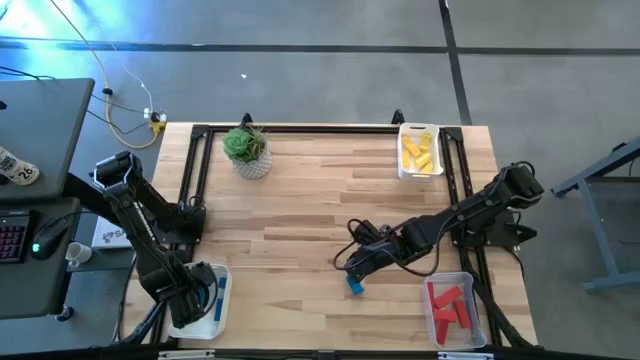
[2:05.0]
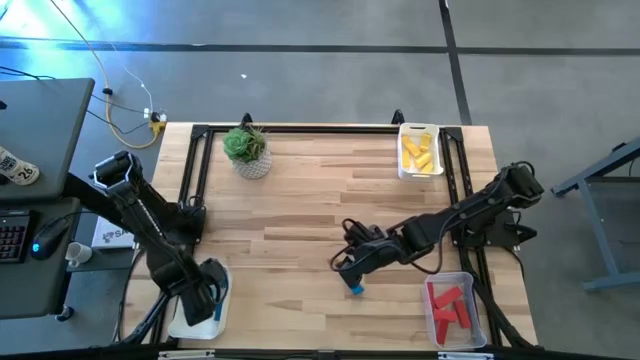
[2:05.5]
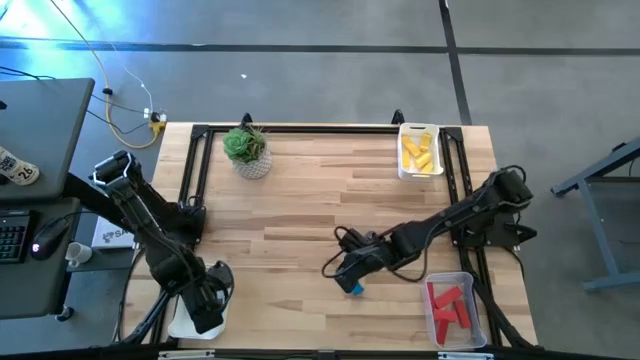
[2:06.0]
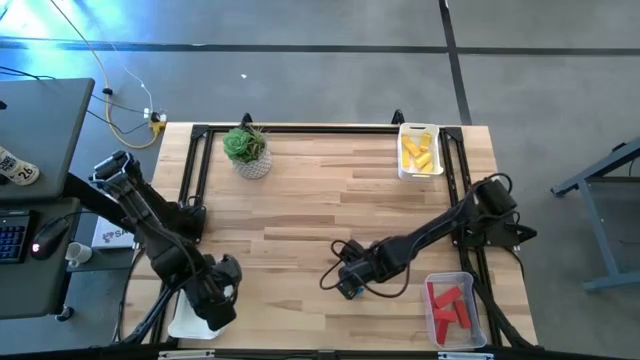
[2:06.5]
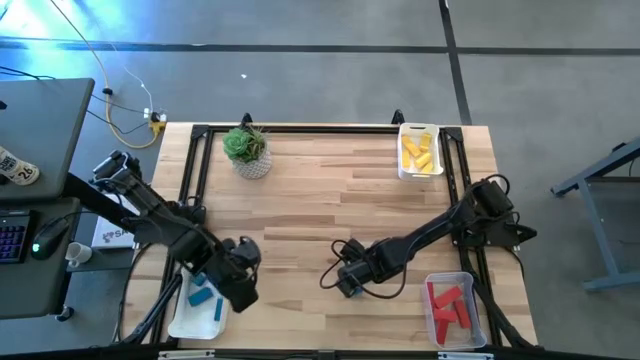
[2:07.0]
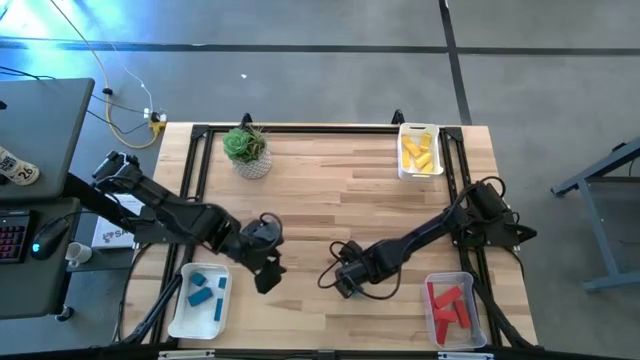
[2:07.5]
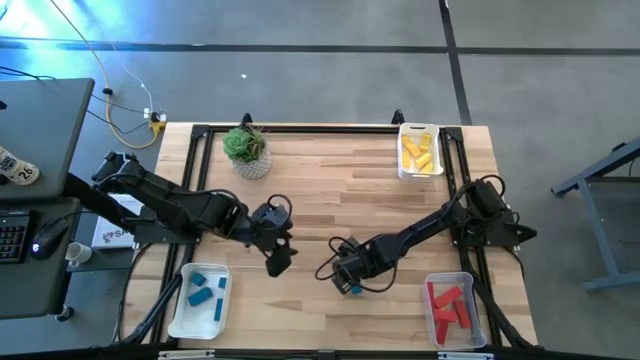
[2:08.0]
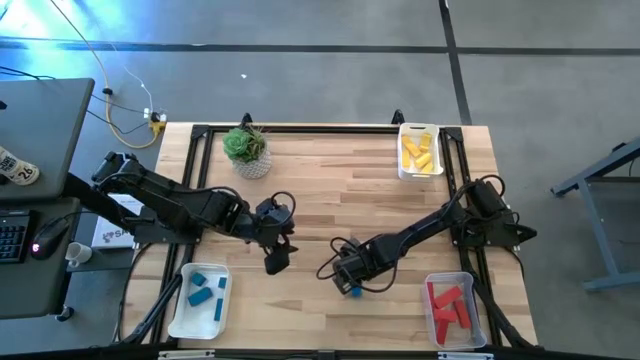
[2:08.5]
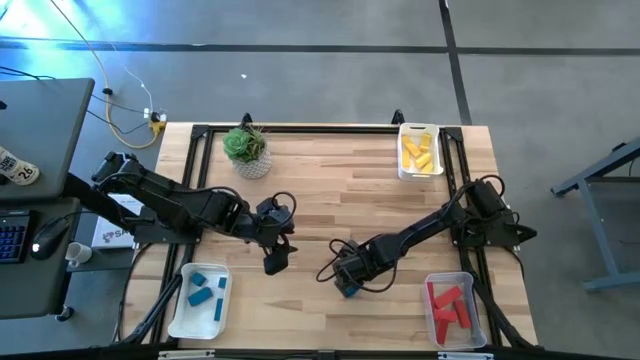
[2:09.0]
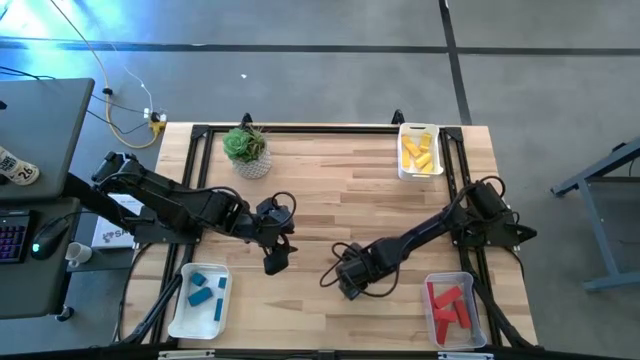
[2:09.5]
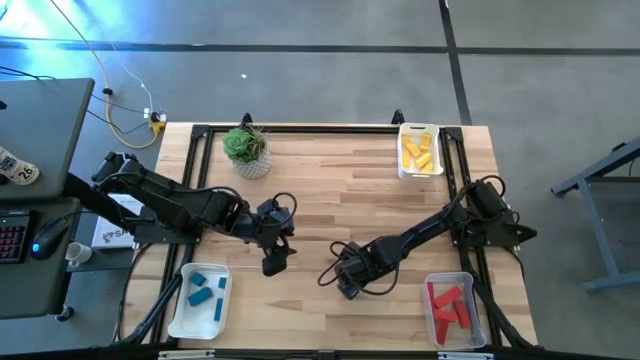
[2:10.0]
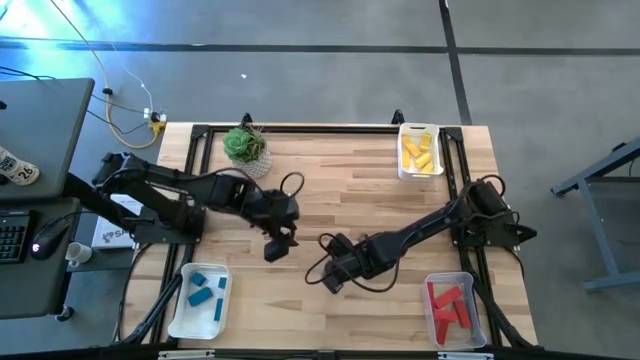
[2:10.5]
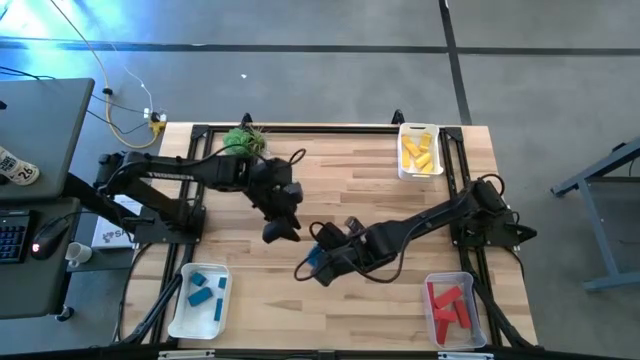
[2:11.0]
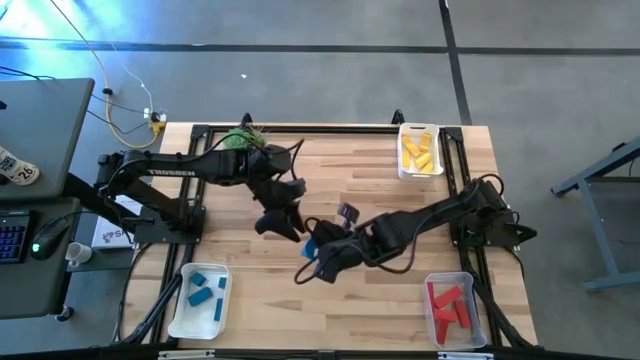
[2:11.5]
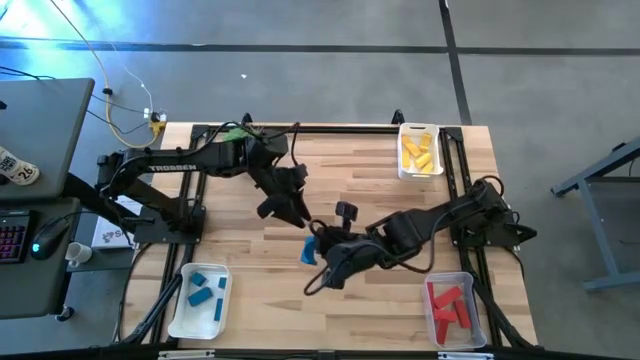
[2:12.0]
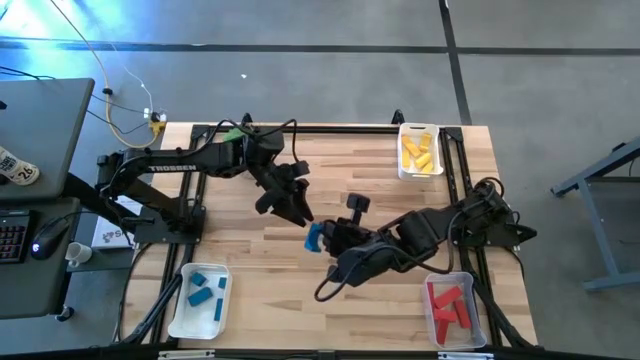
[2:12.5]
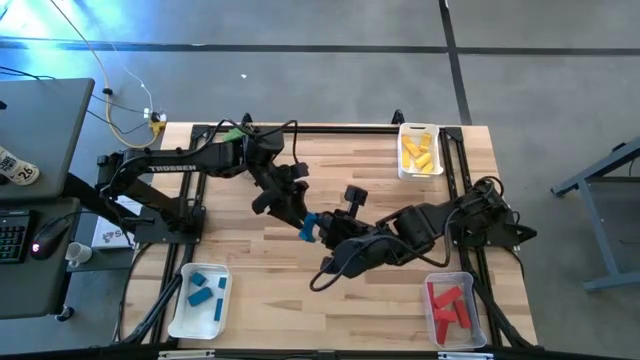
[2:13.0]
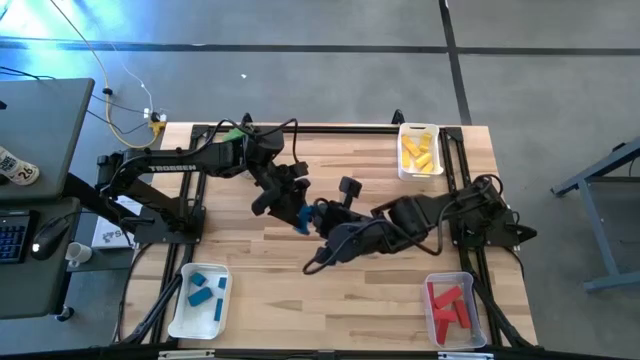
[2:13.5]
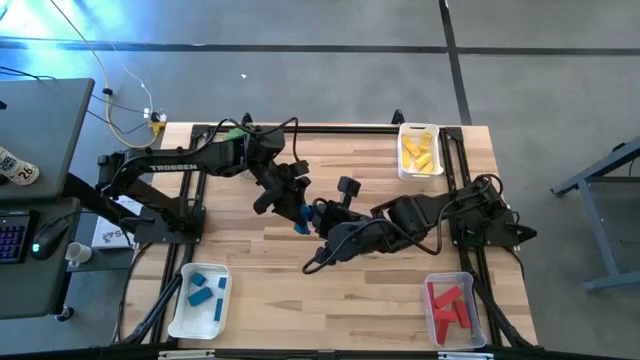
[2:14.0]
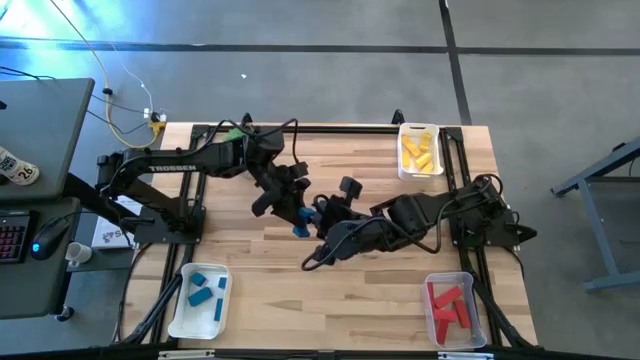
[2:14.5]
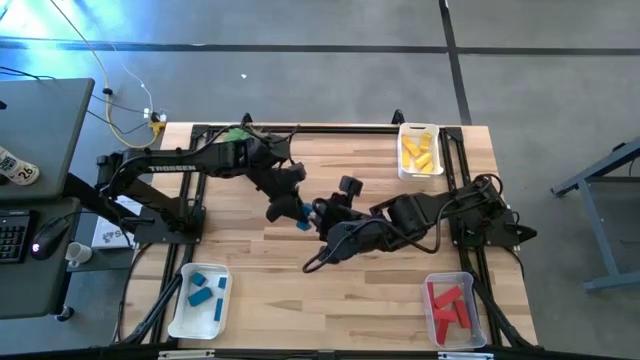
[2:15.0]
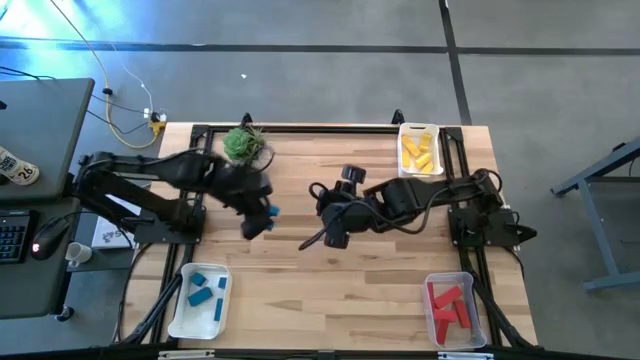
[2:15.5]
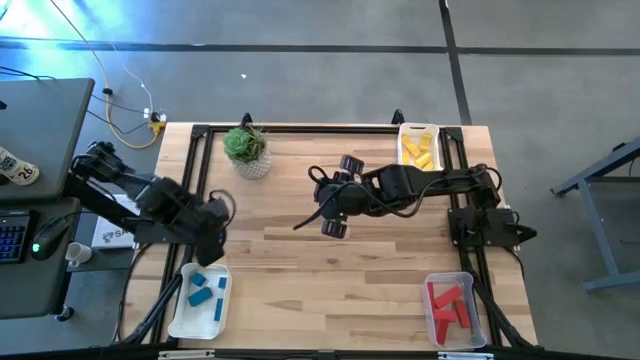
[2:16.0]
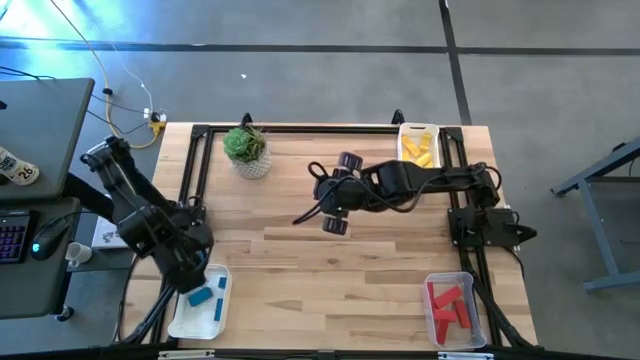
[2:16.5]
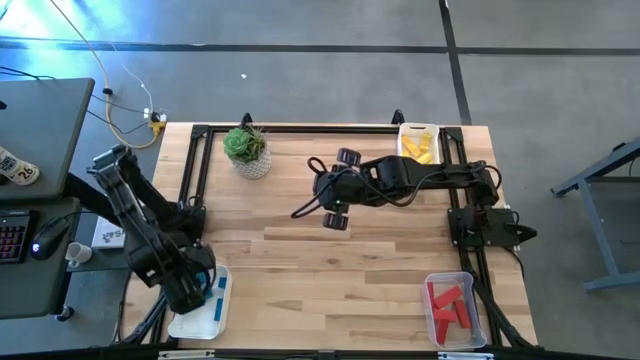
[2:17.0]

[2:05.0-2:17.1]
Task: Sort & place blocks by color
Put the blue block into the bottom white bin

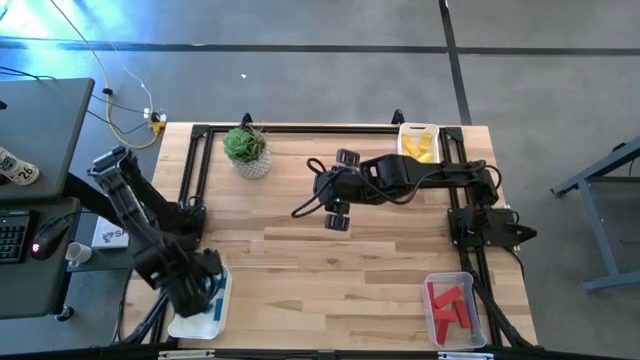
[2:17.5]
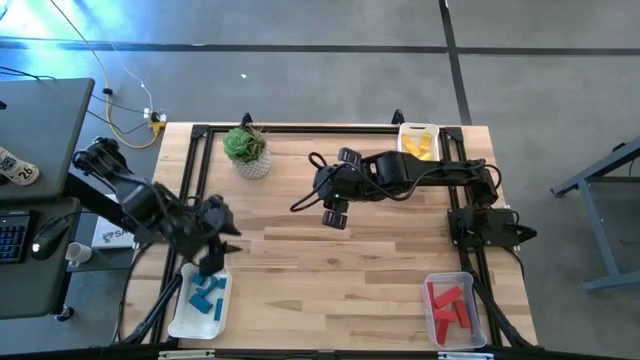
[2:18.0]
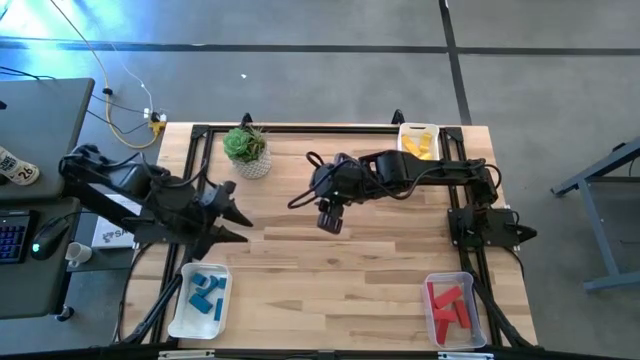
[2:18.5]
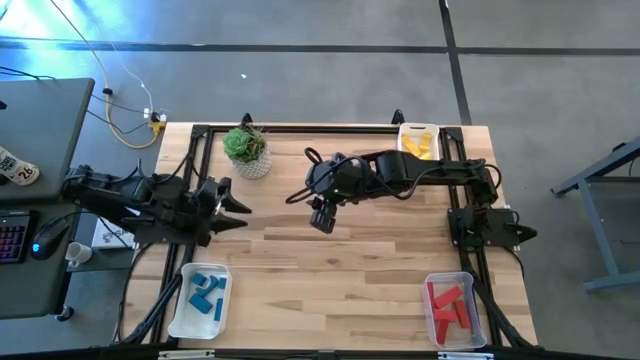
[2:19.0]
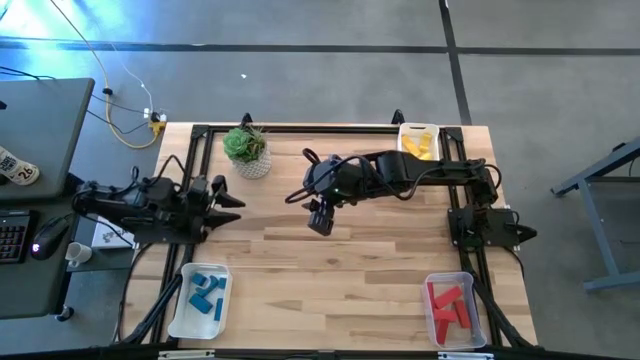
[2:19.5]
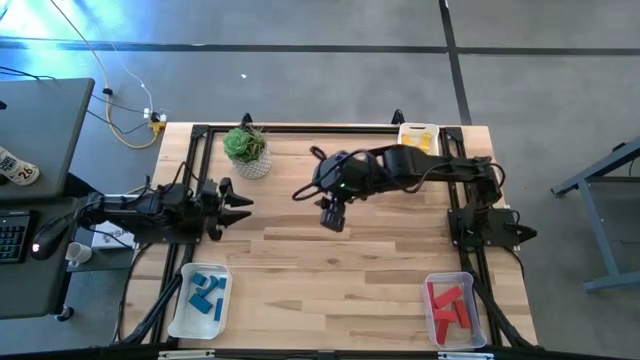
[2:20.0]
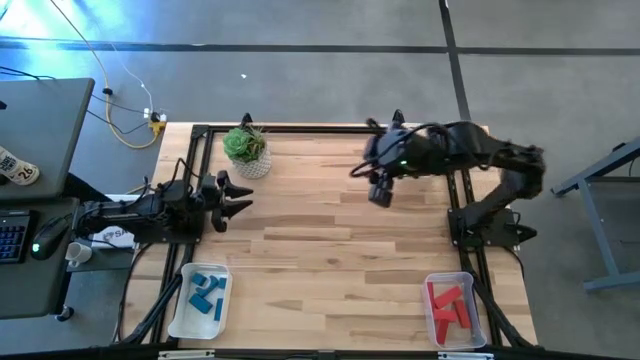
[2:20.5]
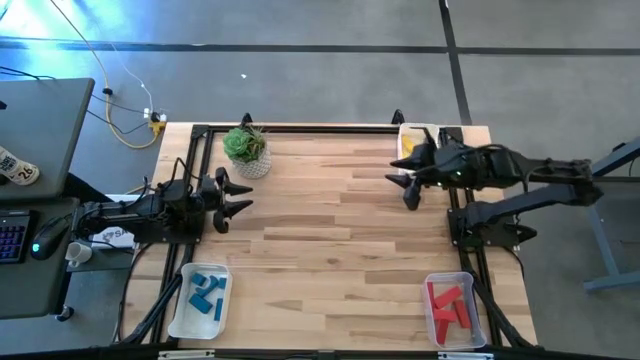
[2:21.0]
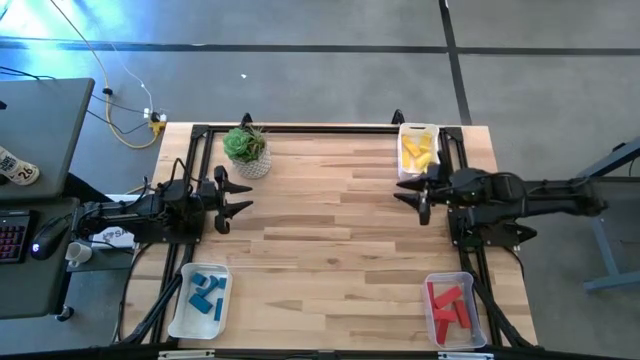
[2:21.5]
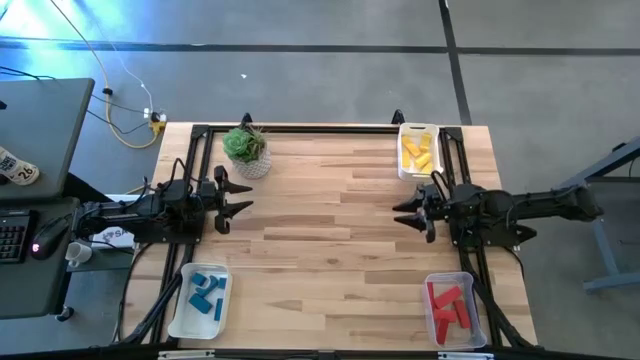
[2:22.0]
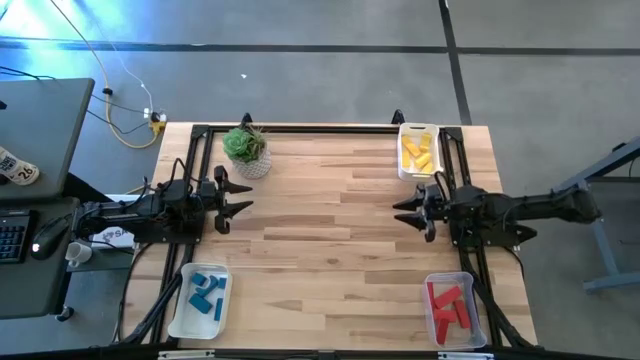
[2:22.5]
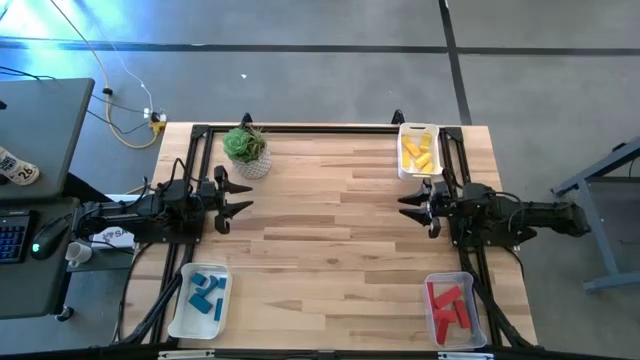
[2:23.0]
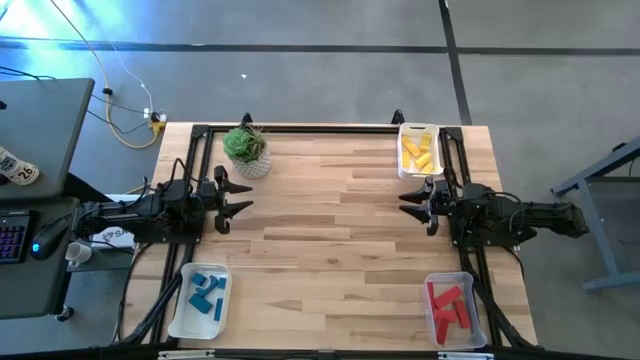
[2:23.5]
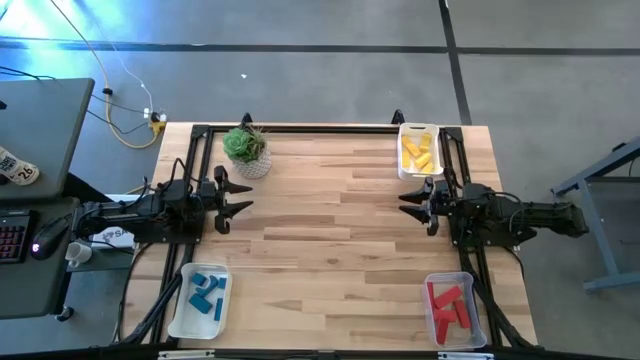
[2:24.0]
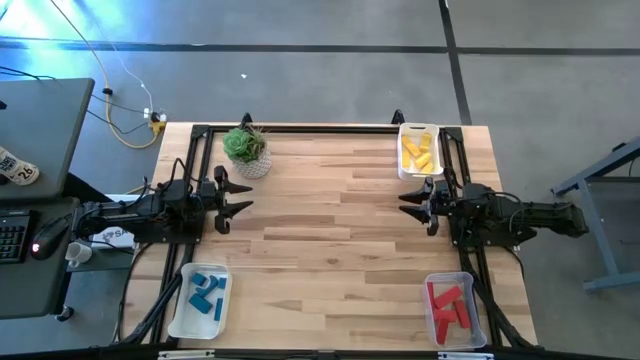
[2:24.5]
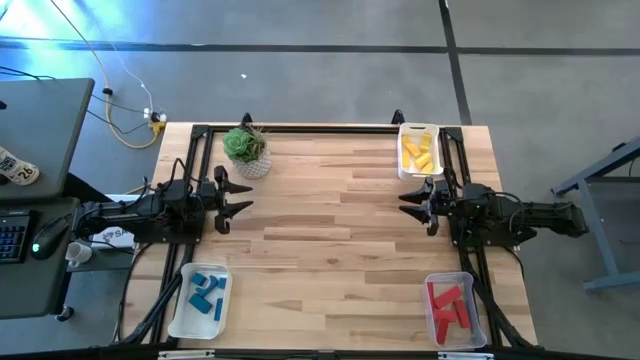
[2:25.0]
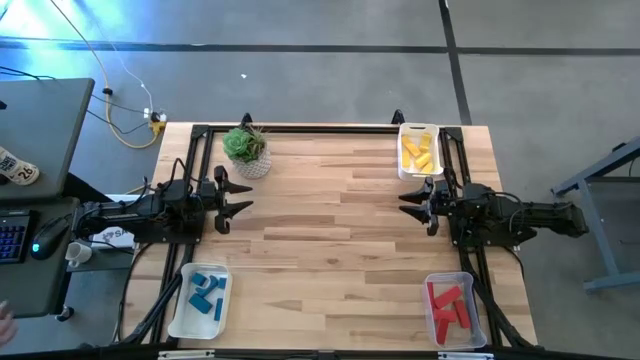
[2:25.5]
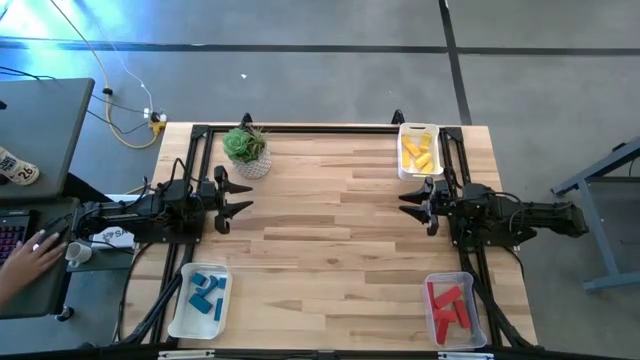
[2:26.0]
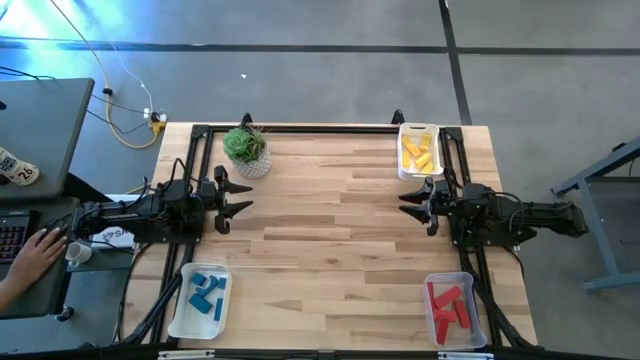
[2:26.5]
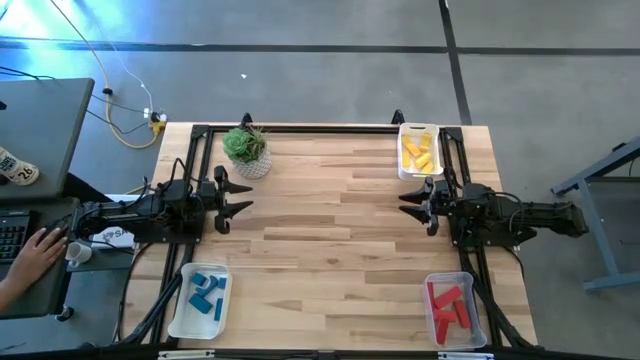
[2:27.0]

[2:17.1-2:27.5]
Return to Home Position
